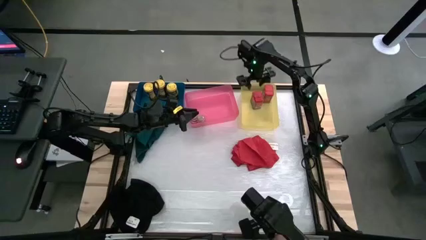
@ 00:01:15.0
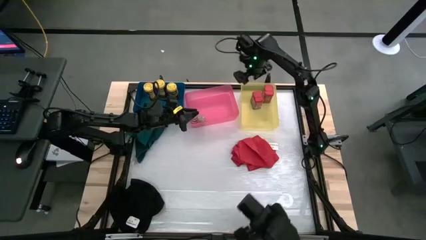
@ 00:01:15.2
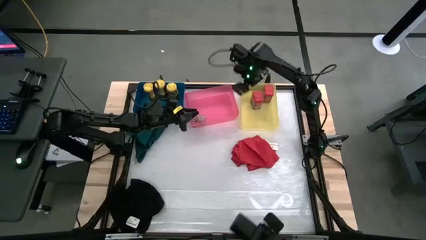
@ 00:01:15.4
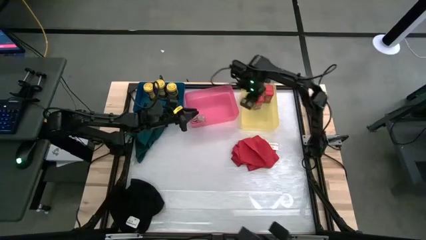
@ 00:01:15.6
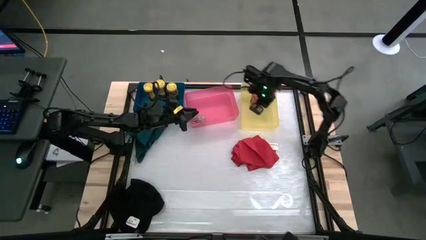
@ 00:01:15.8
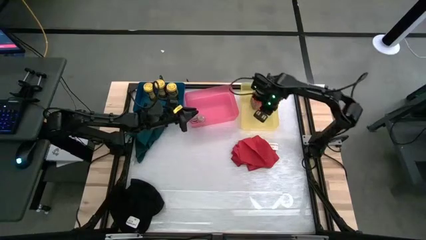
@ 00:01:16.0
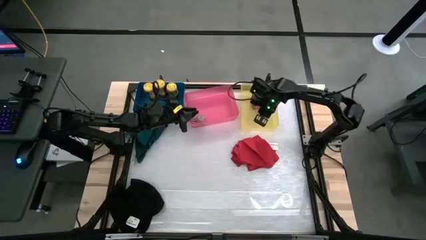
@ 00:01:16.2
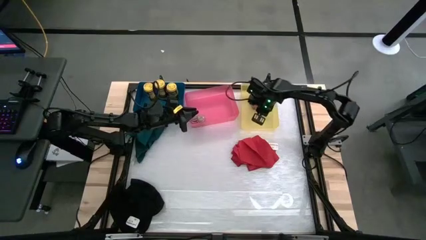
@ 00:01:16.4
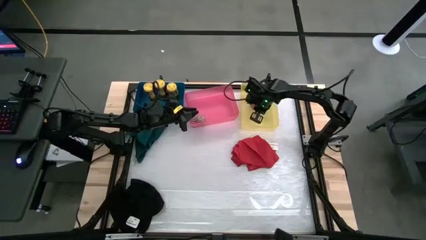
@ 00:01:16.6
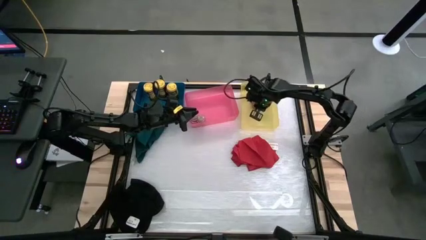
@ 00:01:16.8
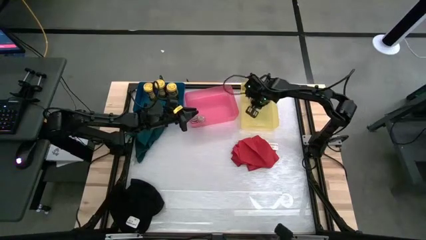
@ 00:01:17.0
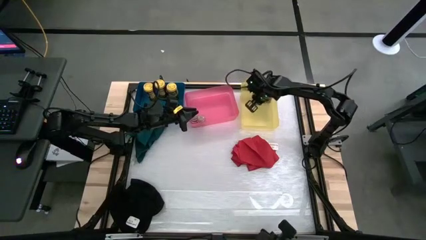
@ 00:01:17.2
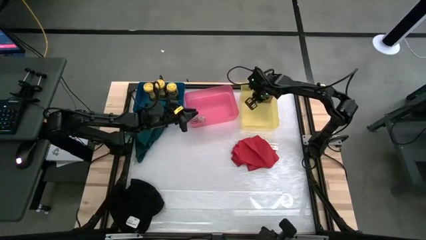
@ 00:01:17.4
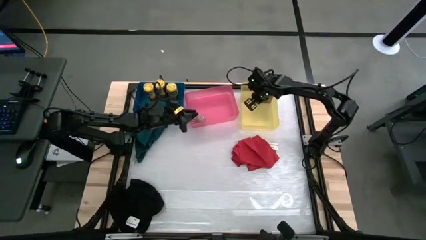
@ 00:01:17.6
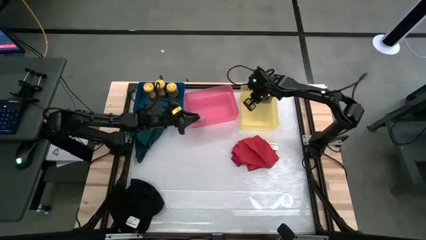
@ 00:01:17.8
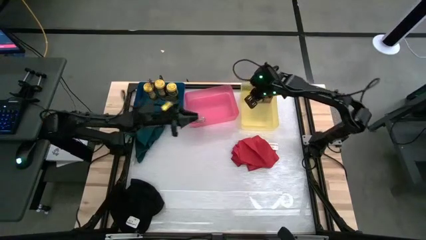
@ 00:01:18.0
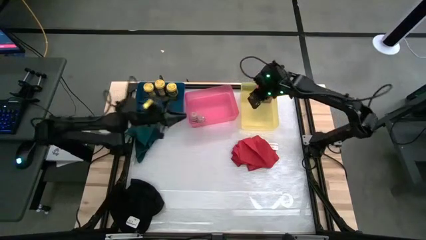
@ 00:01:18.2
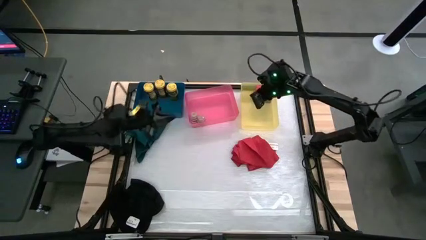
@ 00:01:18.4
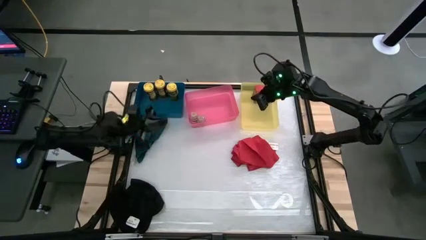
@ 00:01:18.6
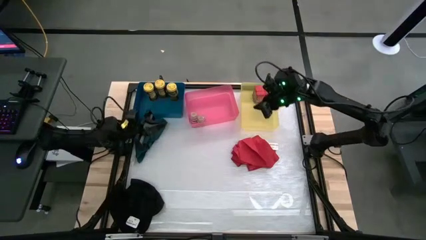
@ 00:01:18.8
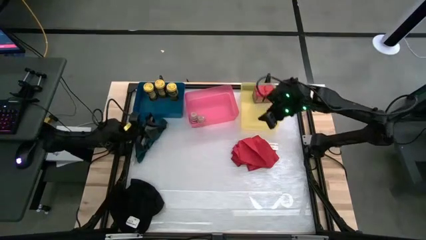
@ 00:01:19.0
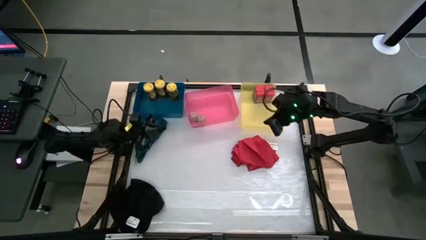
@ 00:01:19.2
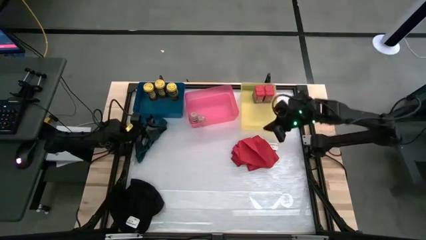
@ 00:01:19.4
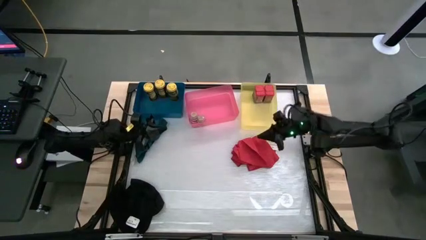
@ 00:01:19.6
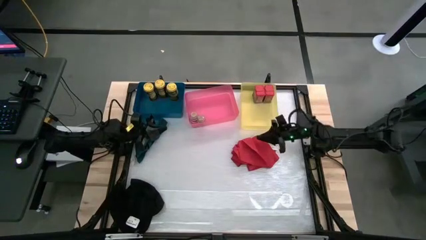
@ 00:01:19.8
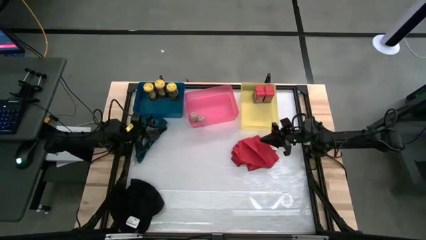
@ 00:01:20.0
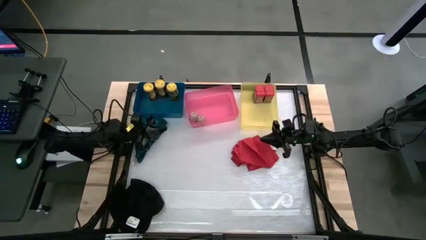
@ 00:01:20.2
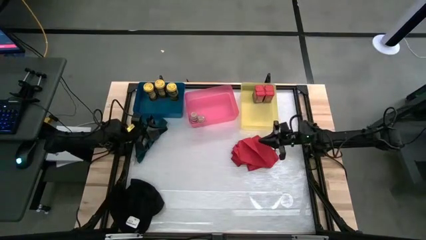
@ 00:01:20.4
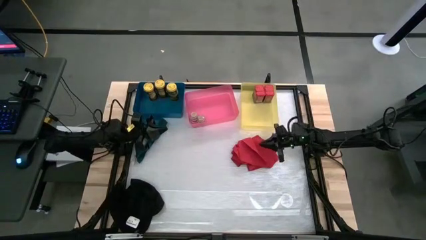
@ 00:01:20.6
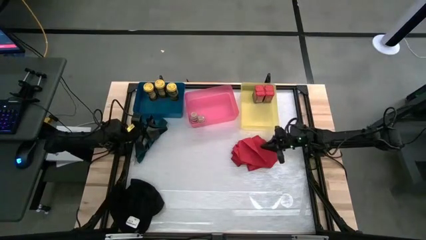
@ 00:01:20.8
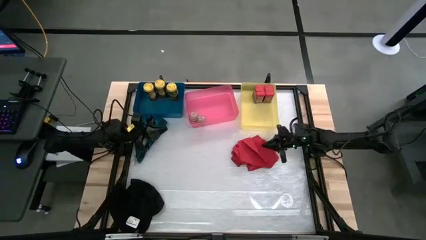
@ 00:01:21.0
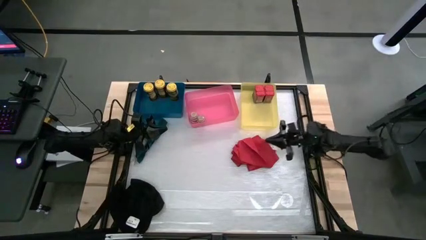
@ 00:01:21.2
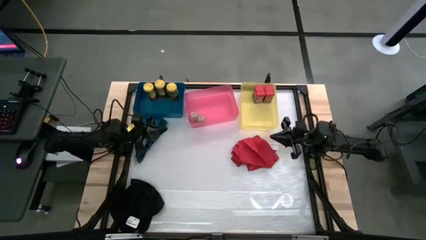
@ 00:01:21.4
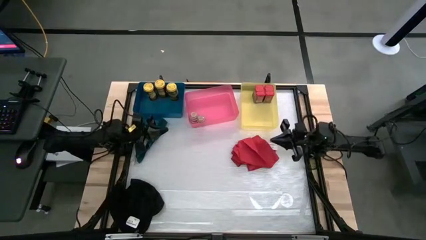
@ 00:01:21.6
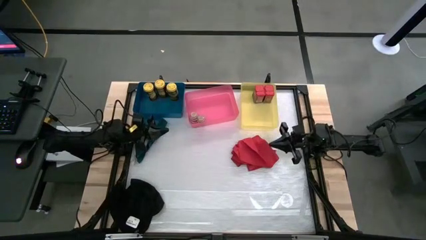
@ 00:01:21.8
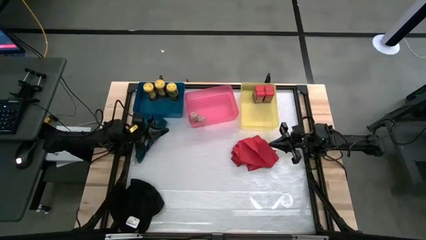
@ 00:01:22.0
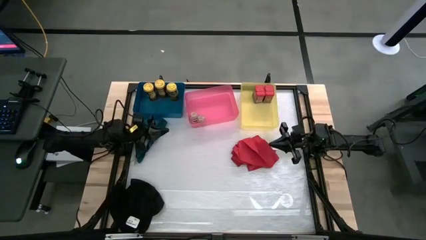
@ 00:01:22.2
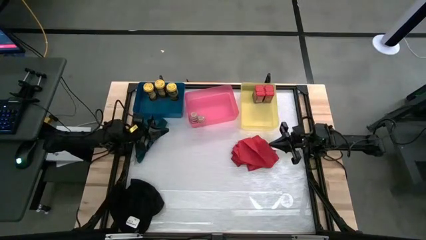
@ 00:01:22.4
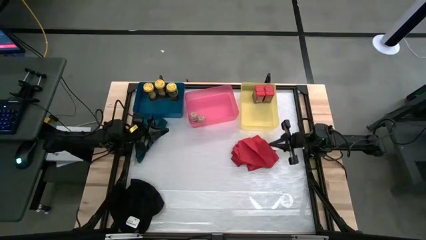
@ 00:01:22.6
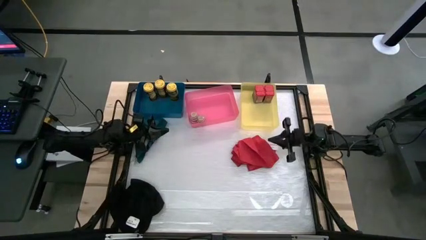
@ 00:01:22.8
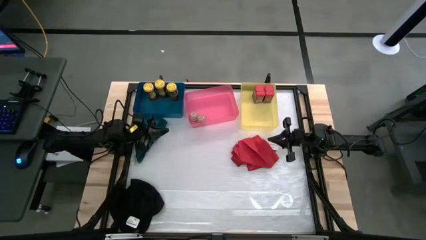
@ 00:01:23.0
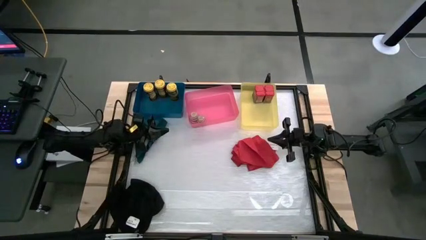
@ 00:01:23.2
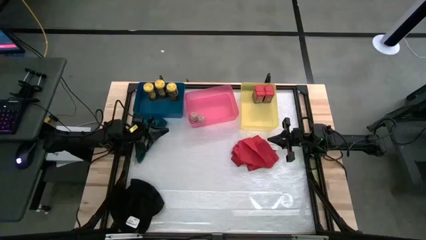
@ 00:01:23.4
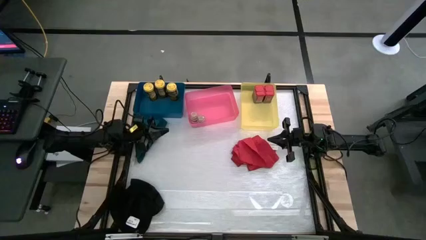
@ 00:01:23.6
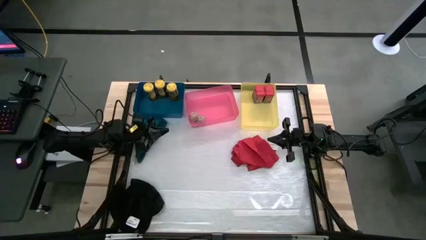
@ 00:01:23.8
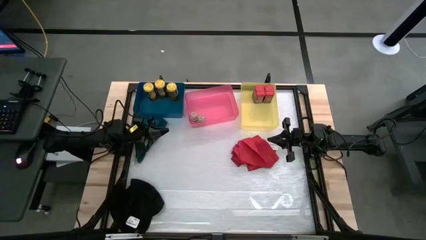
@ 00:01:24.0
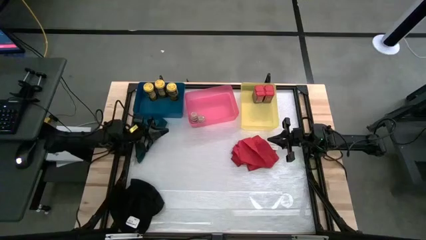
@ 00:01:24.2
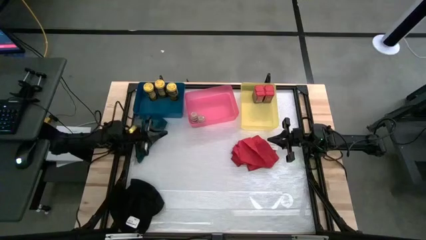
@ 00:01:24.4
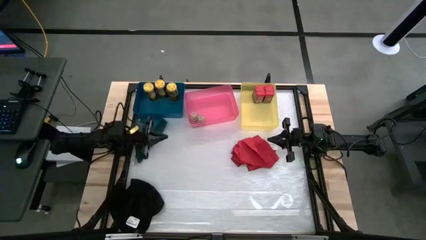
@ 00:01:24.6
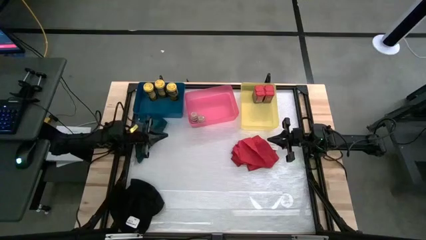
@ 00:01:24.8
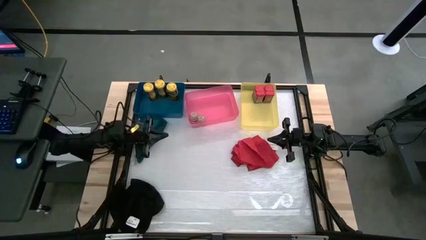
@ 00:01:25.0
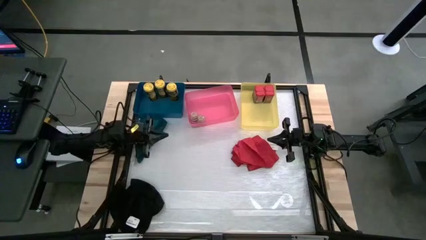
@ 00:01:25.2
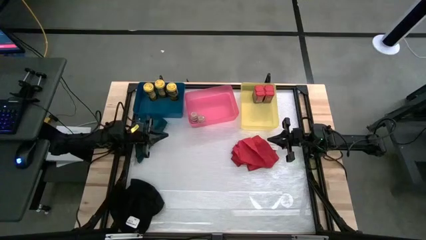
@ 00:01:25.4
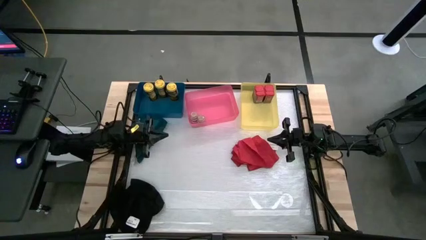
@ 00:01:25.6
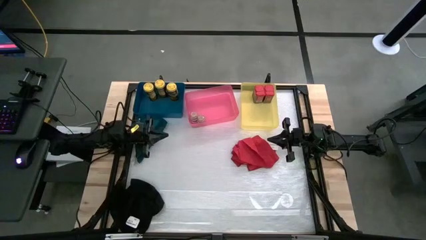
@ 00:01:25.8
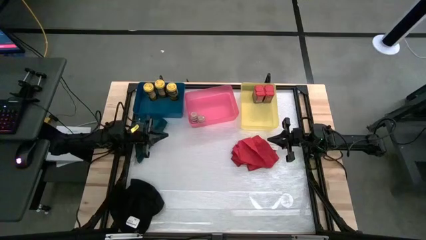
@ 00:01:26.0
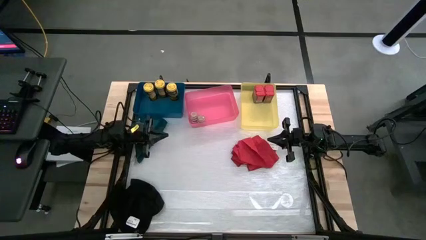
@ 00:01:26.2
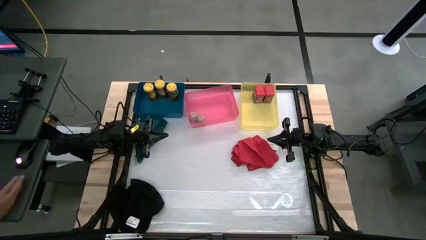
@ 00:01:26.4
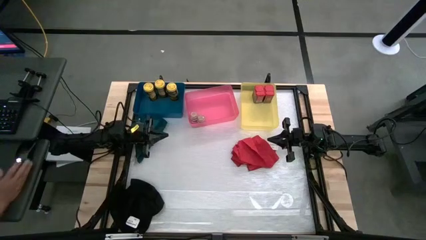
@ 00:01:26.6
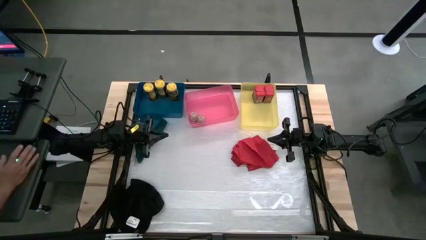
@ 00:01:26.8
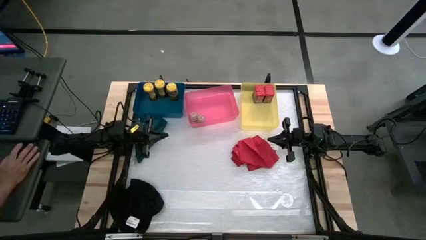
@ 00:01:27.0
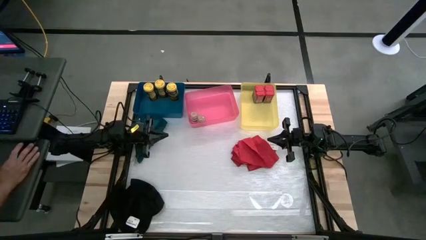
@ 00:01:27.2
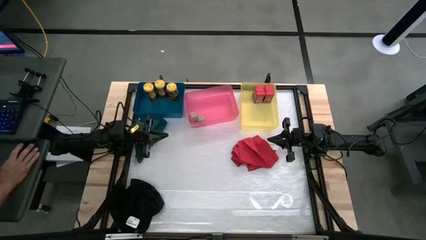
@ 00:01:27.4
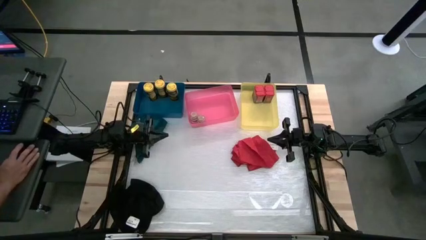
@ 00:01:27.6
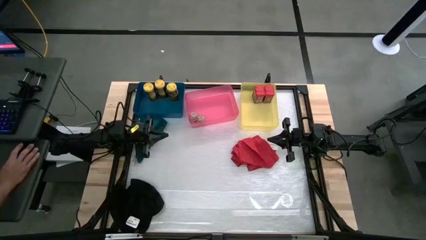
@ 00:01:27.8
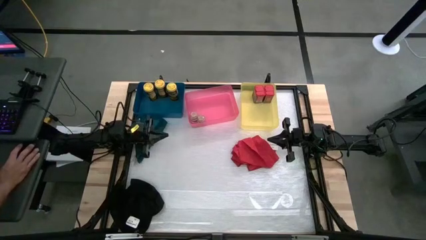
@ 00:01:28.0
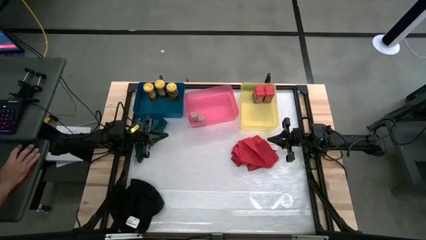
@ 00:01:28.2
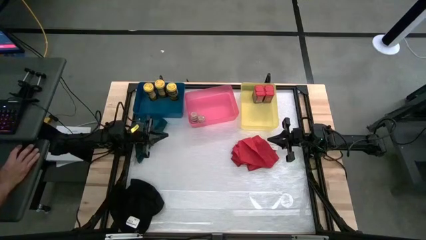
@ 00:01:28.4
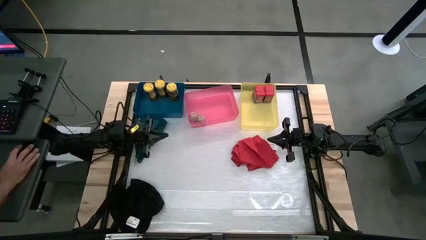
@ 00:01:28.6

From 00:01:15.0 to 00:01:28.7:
Task: Sort spices by type
Return to Home Position
